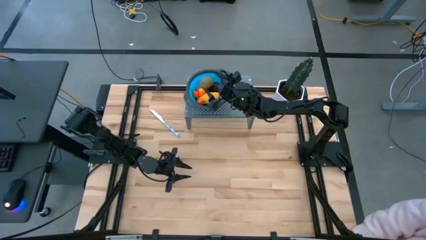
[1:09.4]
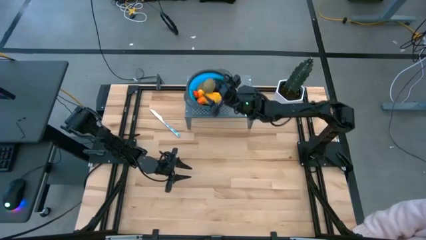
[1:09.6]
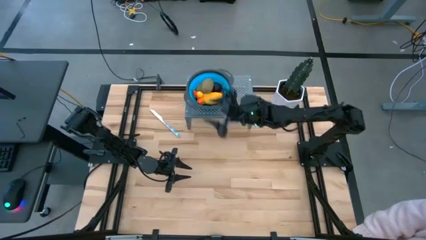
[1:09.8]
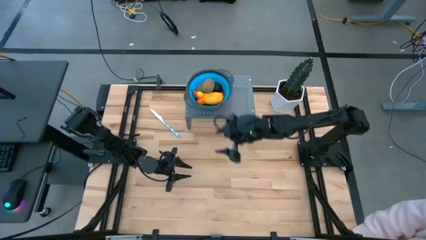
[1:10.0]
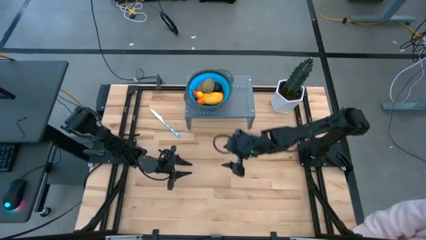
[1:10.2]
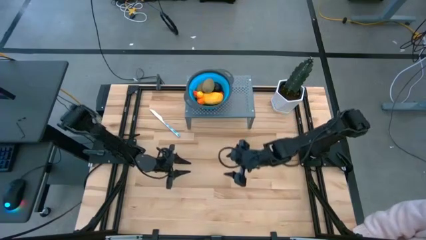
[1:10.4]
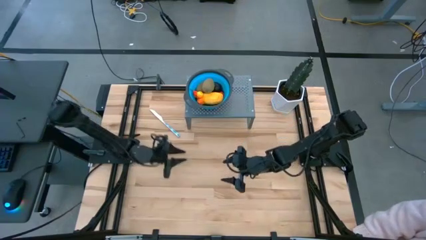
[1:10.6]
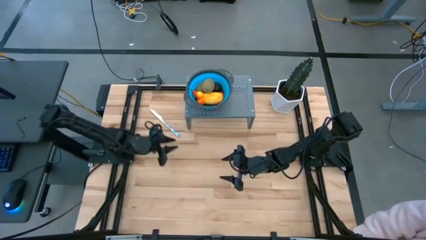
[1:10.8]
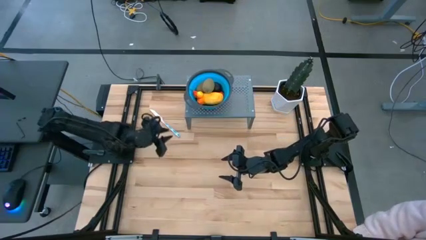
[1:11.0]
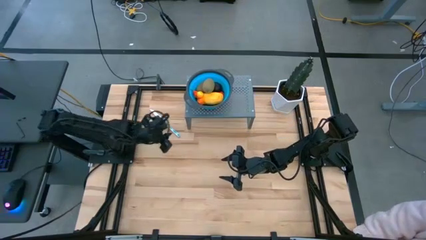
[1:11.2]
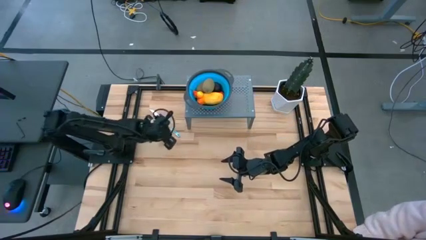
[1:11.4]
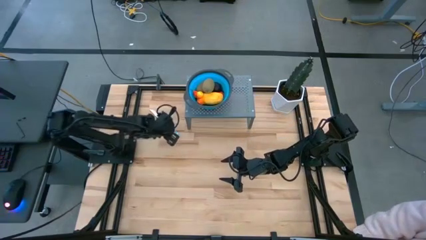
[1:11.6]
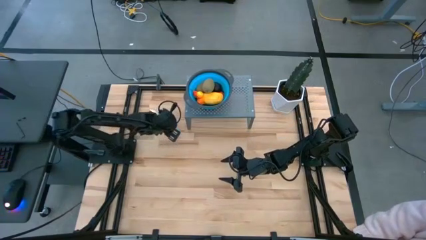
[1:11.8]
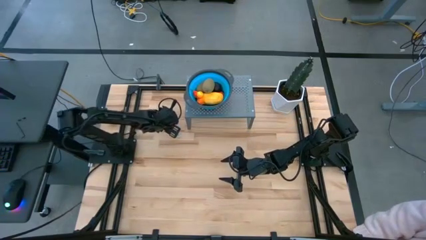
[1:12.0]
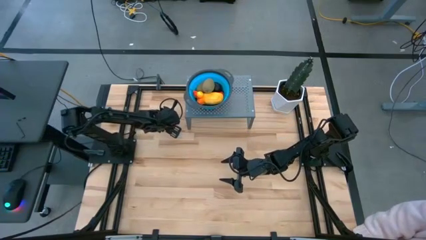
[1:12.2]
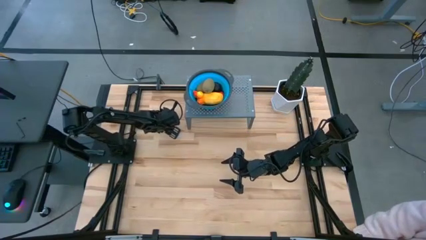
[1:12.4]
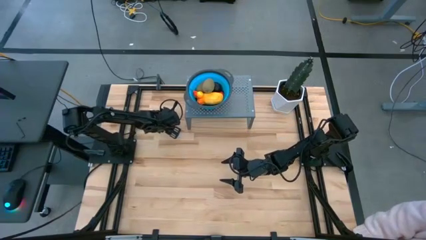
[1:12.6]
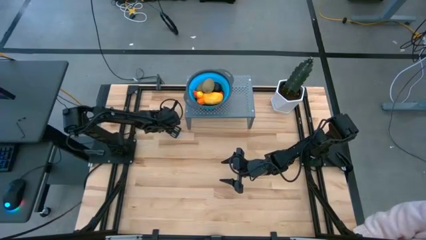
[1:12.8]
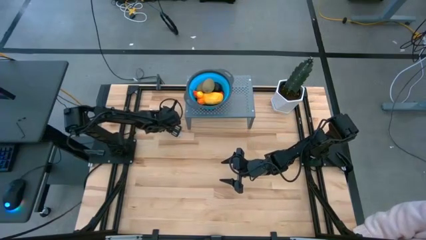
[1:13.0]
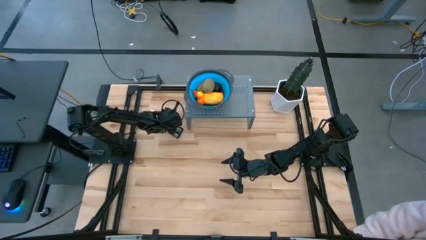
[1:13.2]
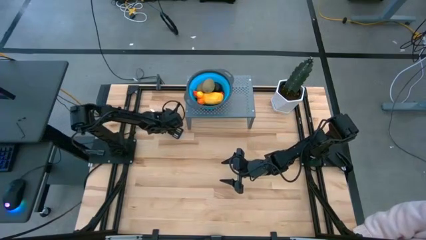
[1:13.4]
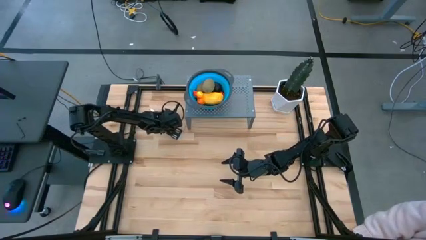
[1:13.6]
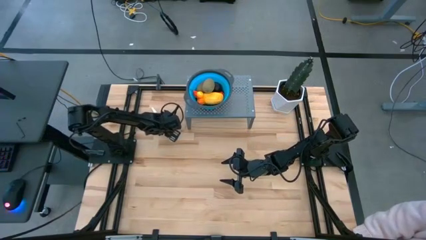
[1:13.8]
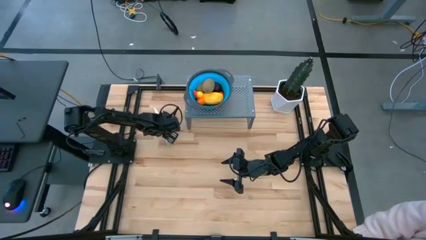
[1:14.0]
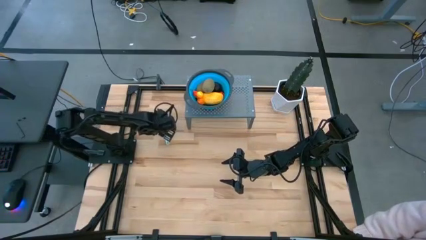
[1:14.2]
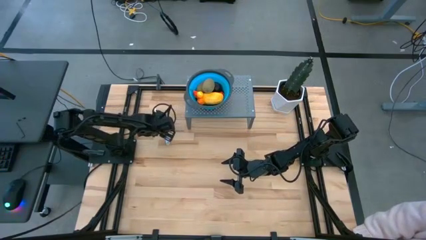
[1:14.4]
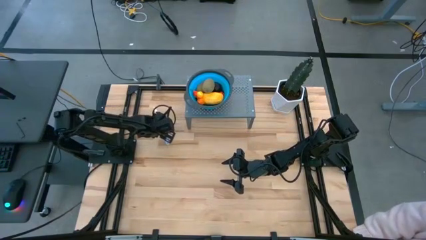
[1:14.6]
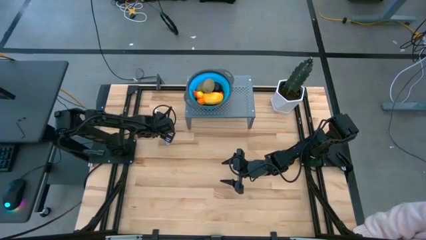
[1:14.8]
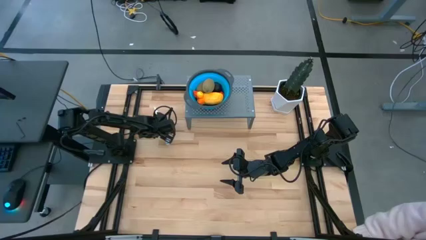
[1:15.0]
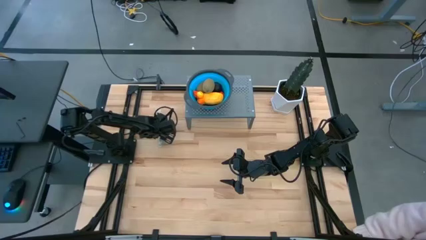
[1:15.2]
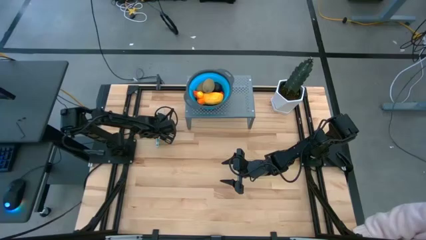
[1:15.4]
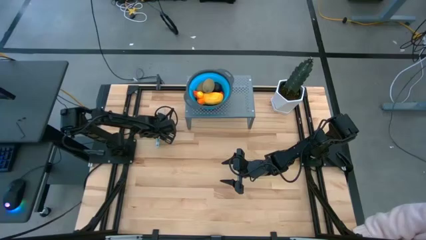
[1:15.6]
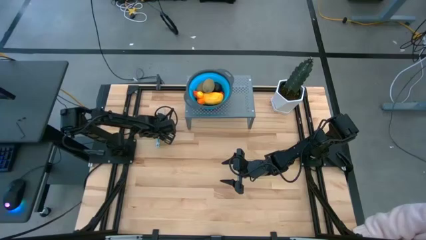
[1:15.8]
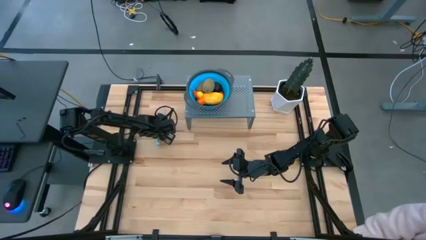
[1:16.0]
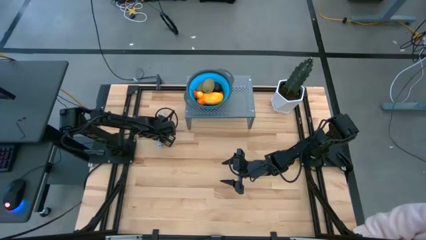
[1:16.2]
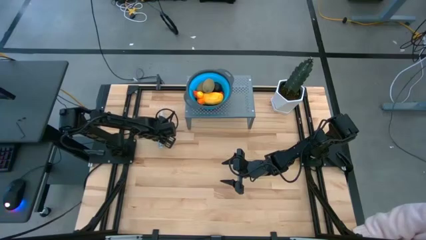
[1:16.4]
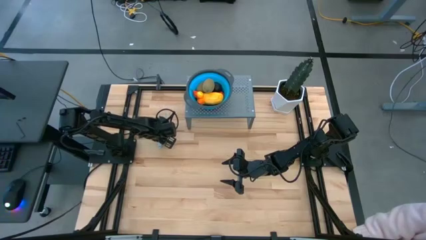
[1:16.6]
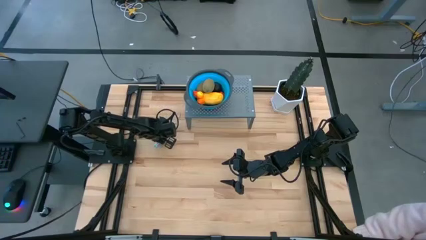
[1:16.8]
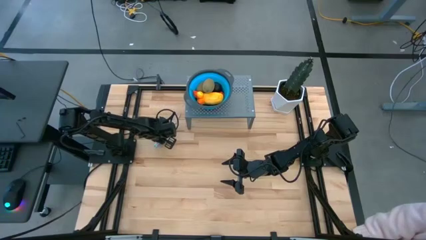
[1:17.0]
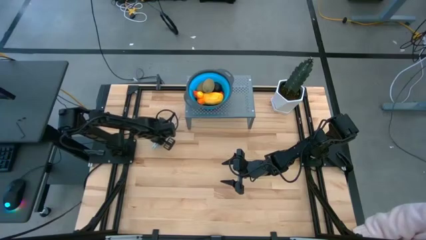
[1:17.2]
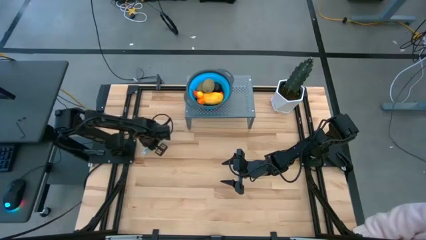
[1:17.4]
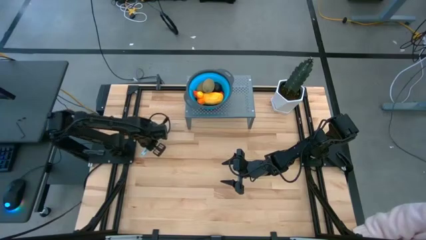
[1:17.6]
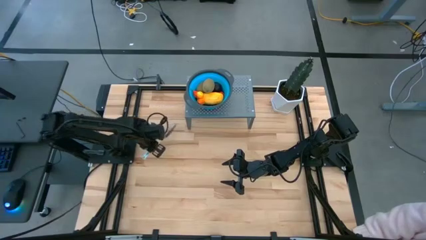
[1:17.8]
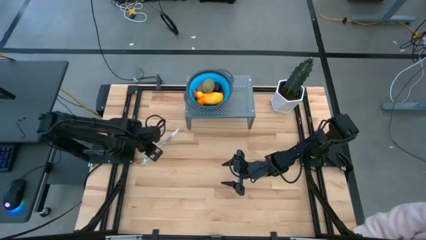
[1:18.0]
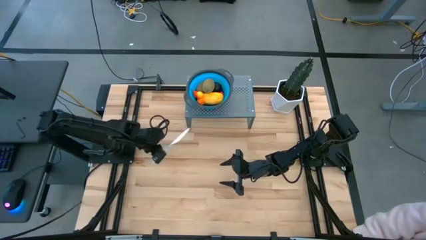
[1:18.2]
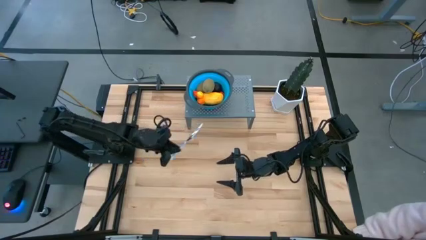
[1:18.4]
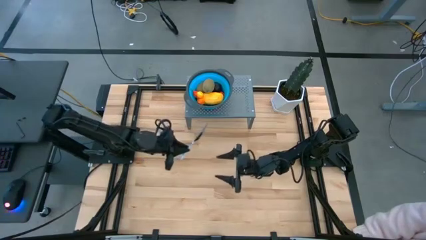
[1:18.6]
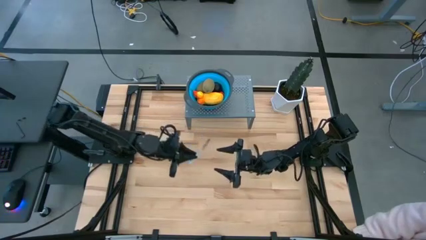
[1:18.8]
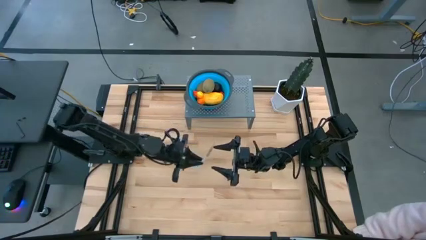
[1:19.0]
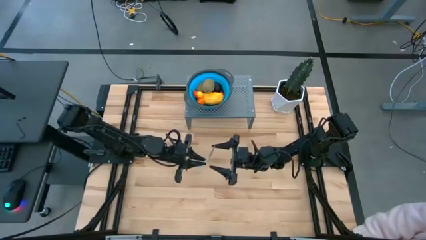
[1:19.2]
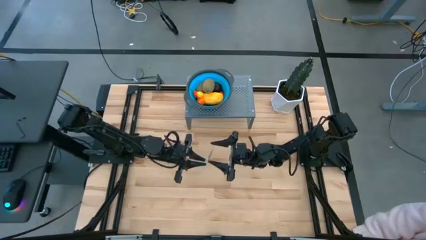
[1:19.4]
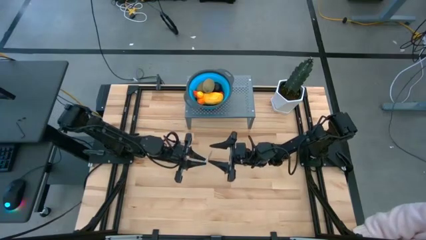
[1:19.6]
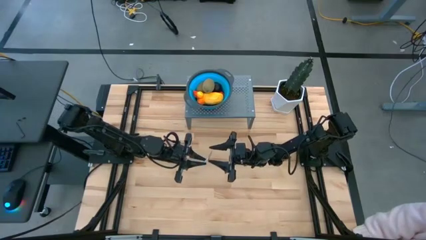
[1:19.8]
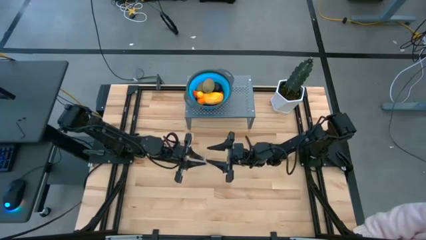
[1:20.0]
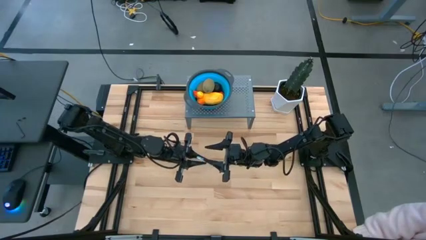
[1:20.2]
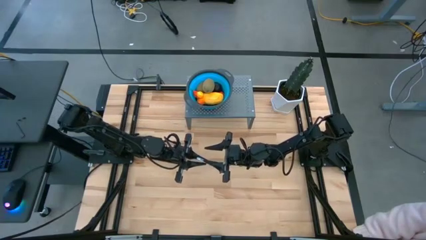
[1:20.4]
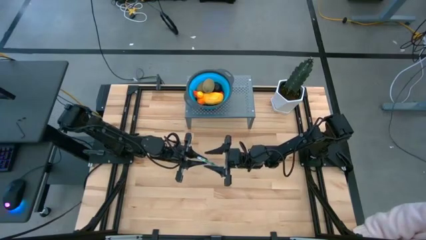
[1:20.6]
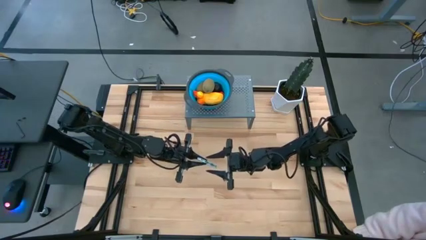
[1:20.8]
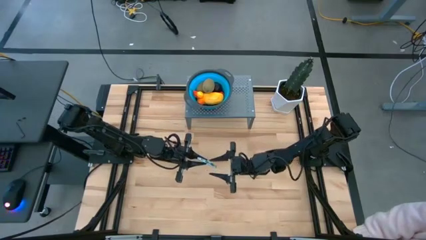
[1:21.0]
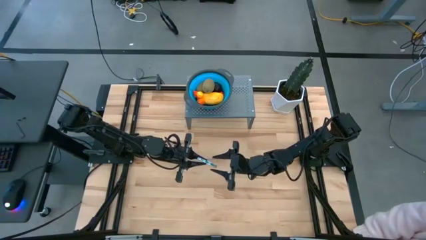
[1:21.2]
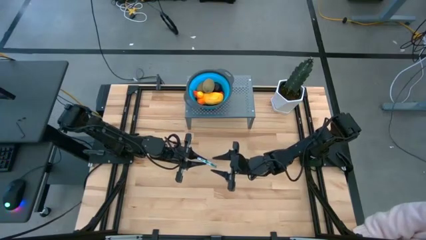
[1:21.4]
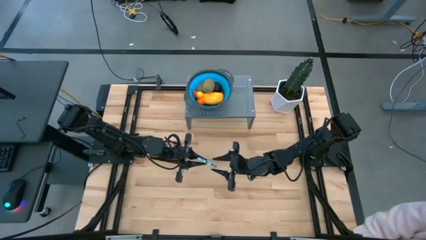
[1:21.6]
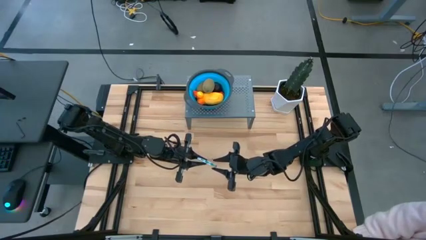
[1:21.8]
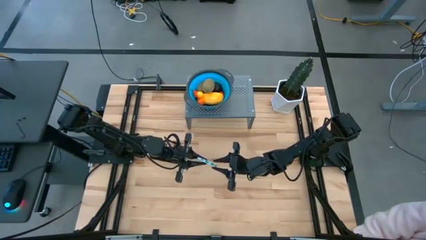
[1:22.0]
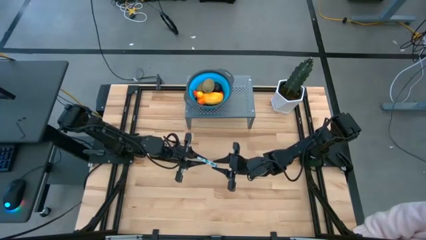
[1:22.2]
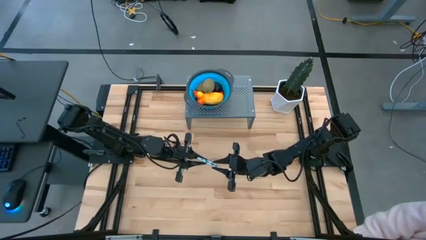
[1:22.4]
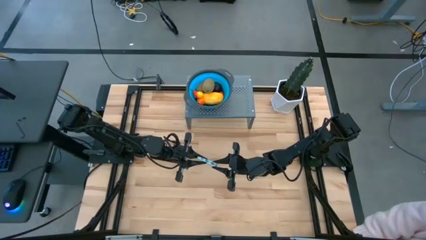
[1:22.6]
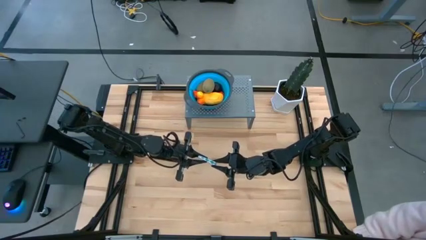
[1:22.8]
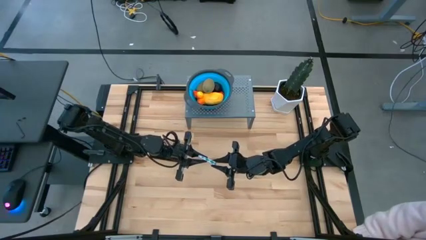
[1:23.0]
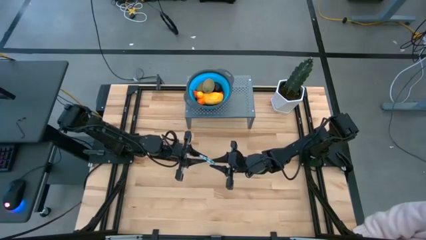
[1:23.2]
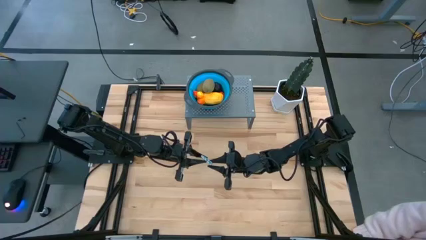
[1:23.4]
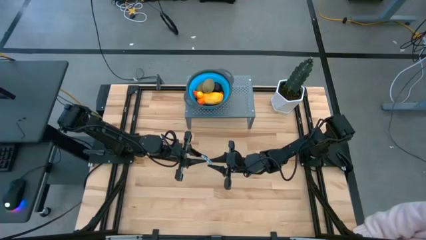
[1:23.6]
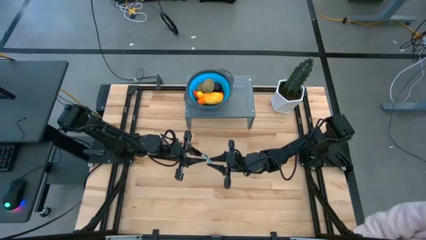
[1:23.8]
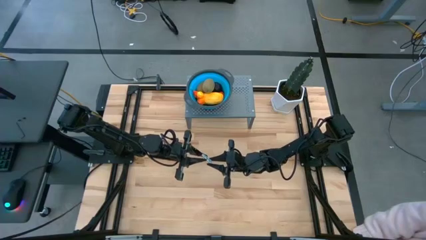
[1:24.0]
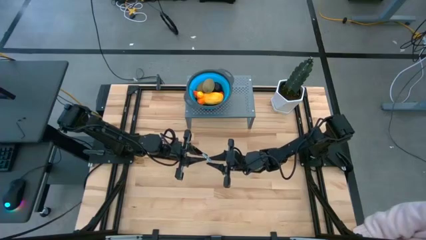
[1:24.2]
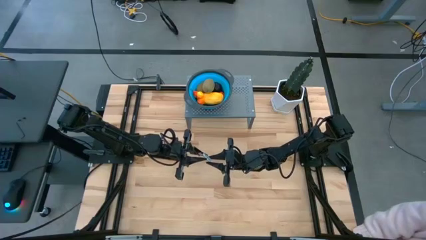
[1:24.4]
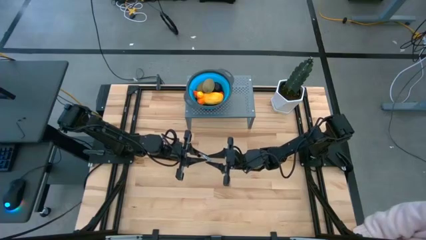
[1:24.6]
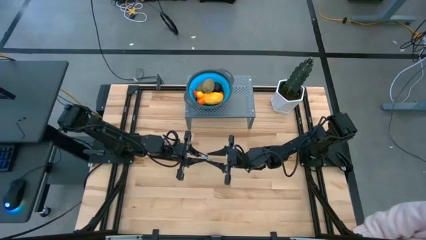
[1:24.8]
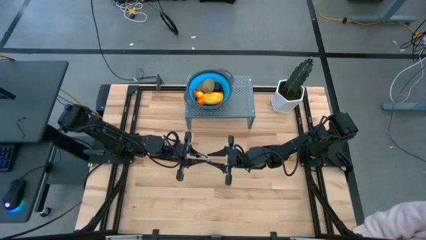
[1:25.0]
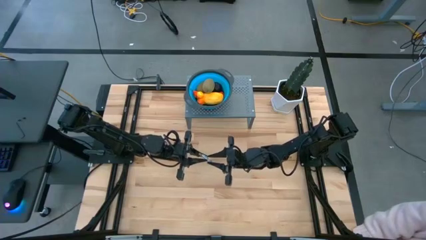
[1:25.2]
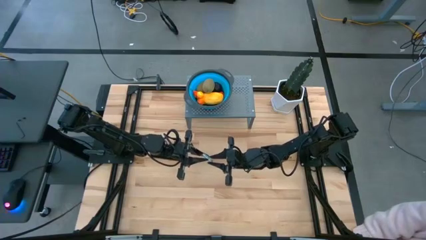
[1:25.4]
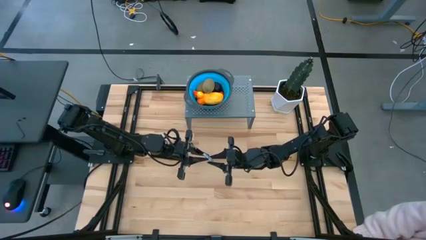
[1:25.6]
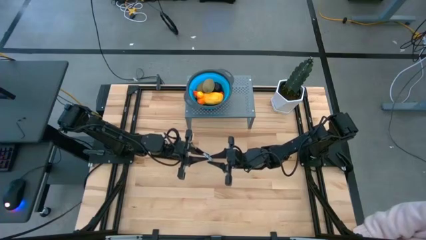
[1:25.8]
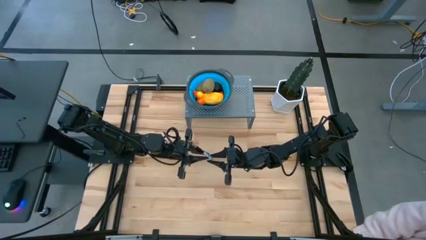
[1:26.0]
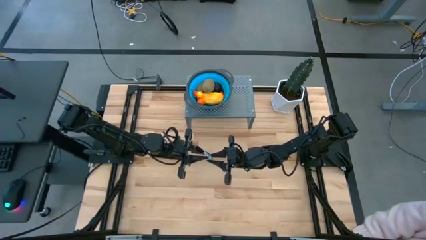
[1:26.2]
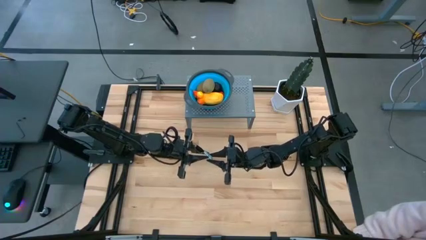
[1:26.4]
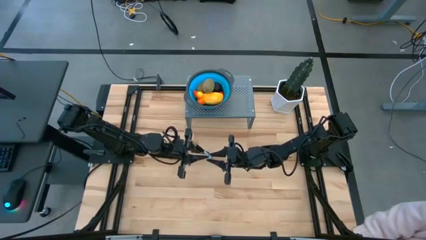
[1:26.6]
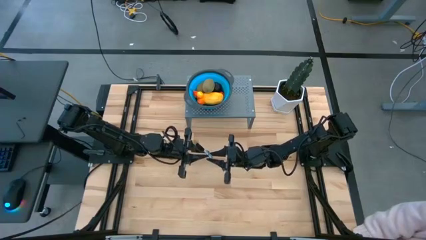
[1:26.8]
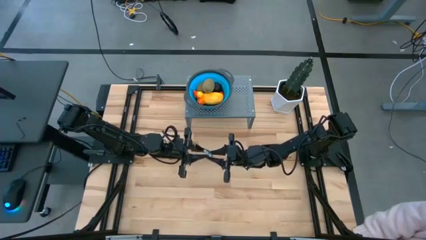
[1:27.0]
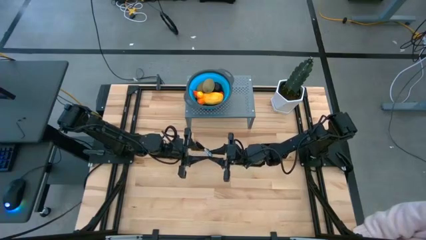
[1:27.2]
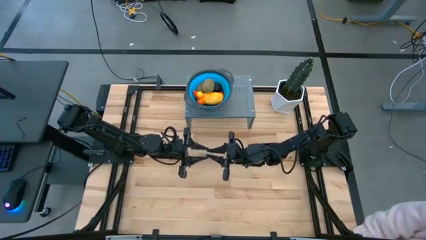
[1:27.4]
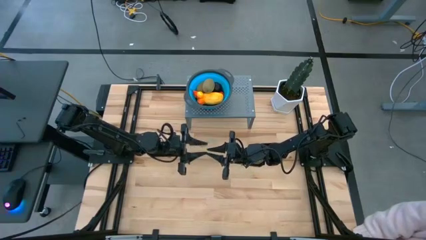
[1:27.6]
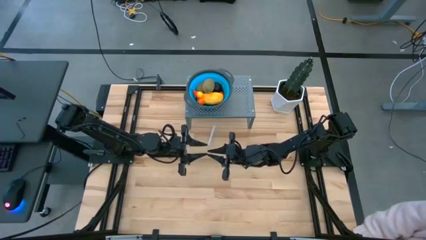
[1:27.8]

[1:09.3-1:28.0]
Task: Pick & Place Fruit
Put the blue knife on the shelf
